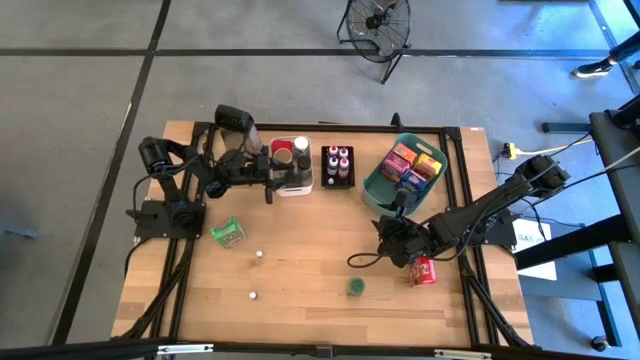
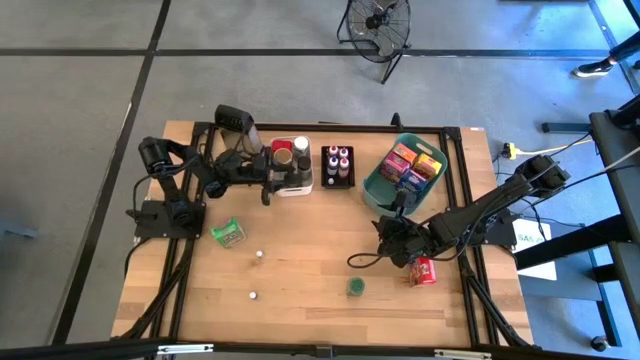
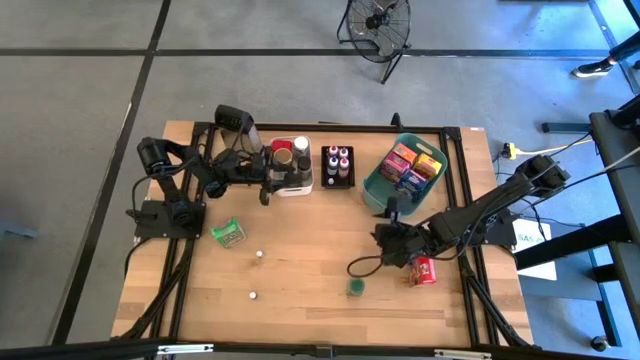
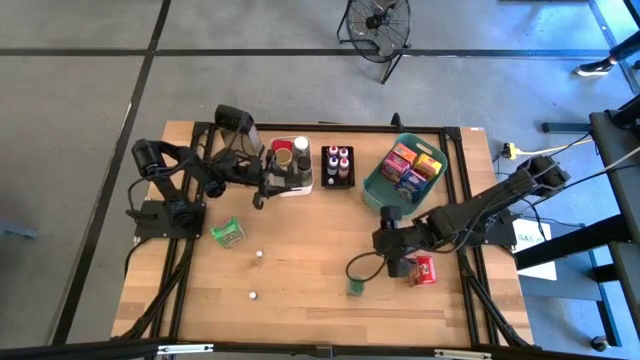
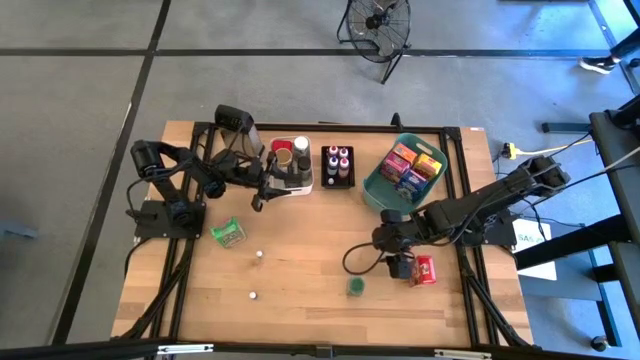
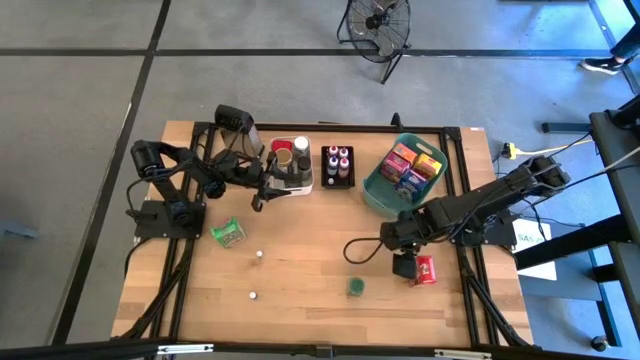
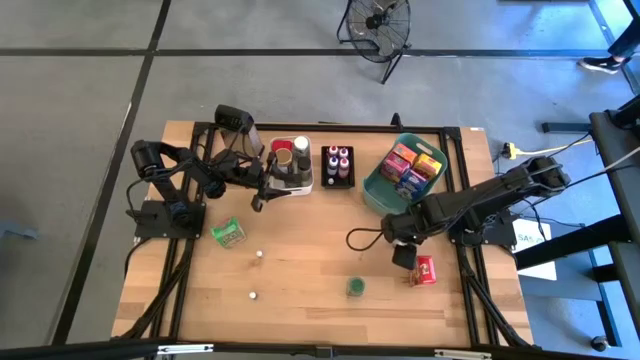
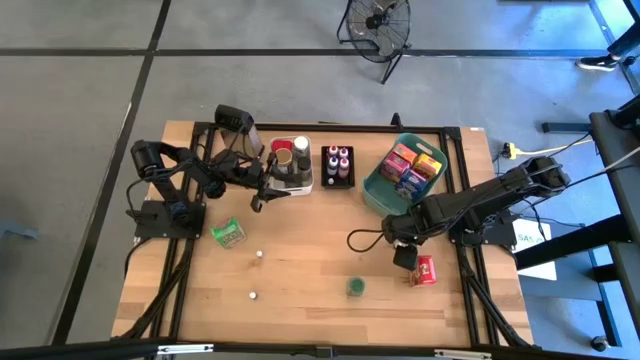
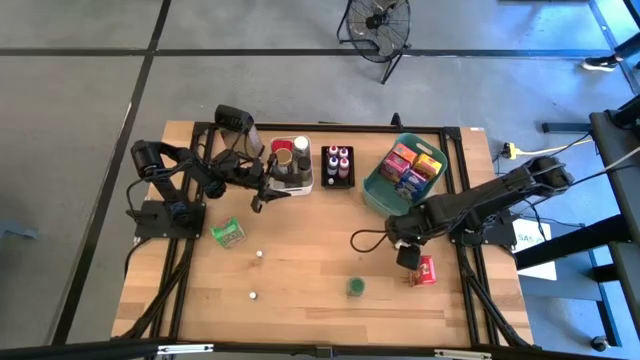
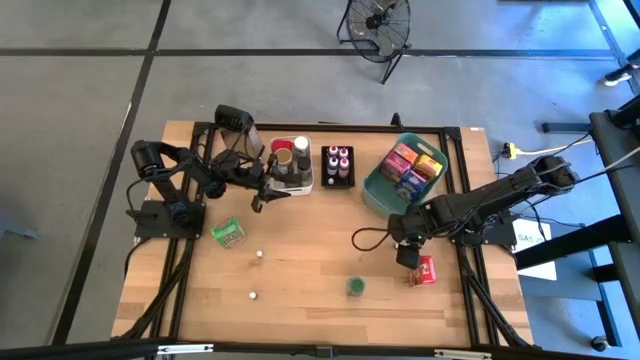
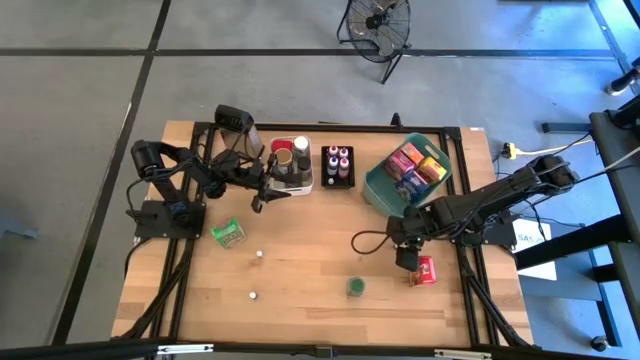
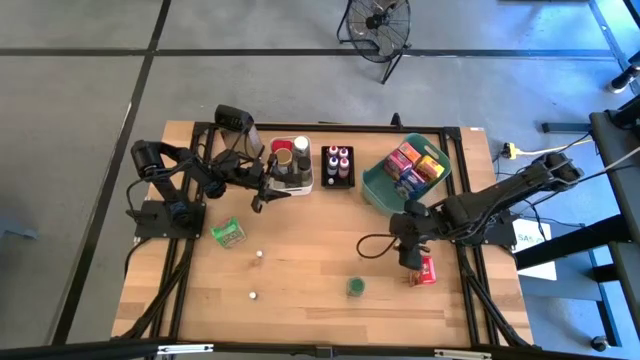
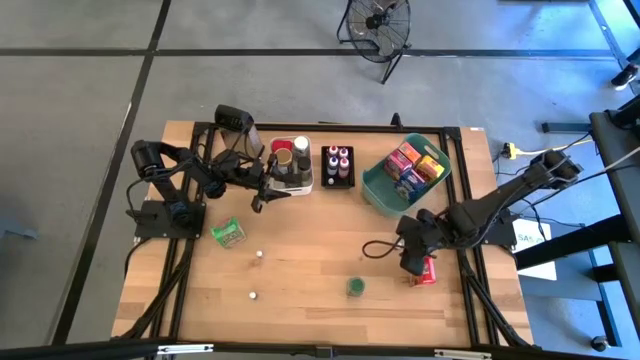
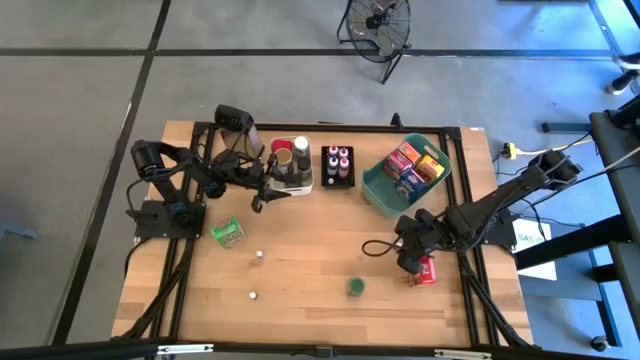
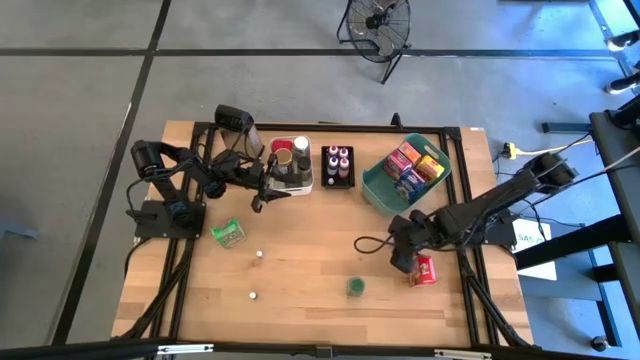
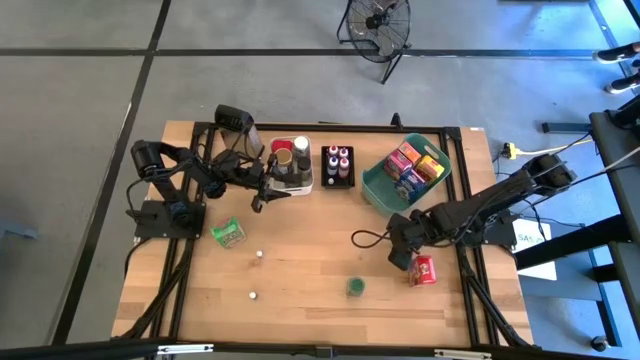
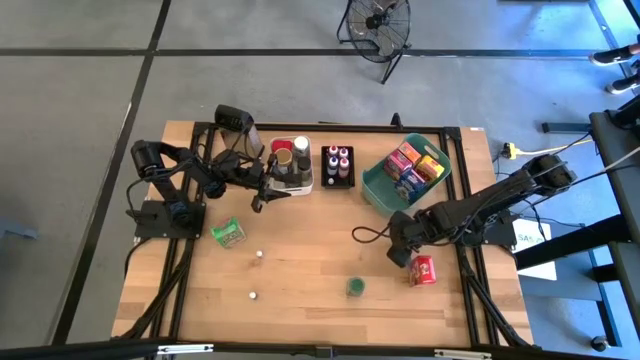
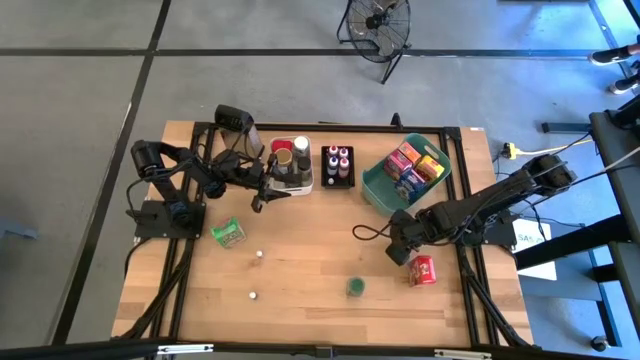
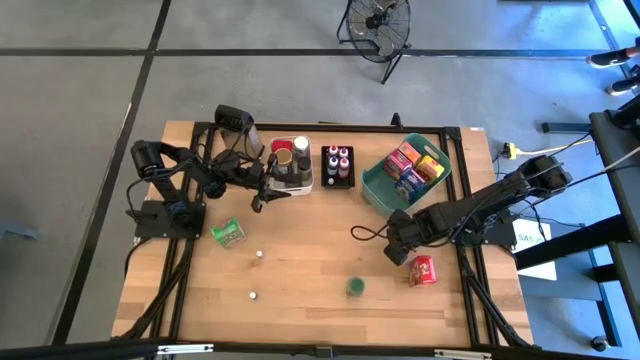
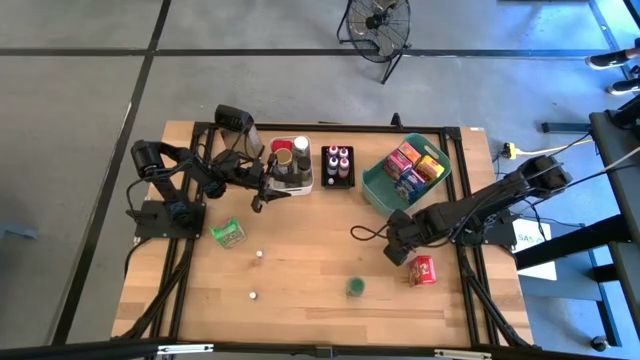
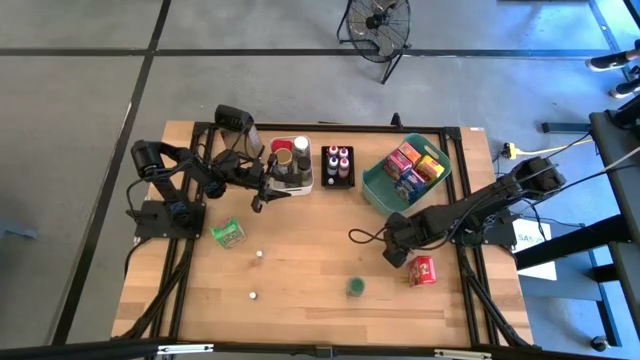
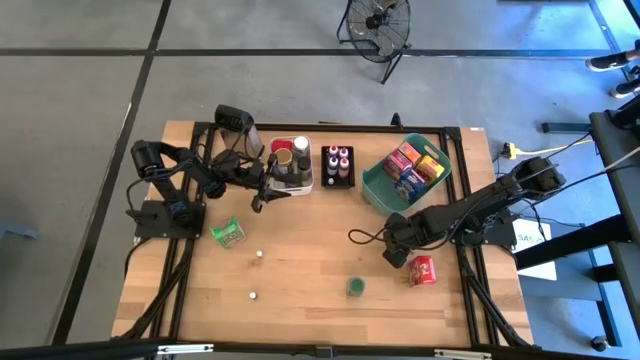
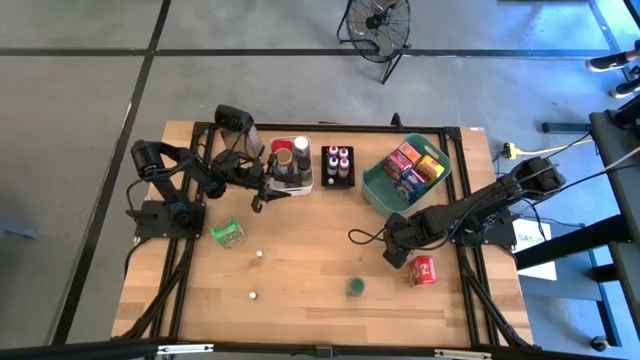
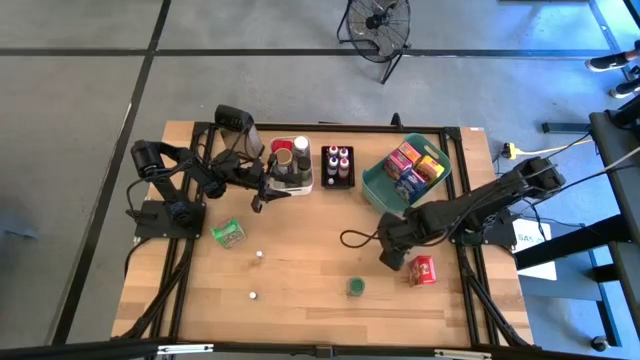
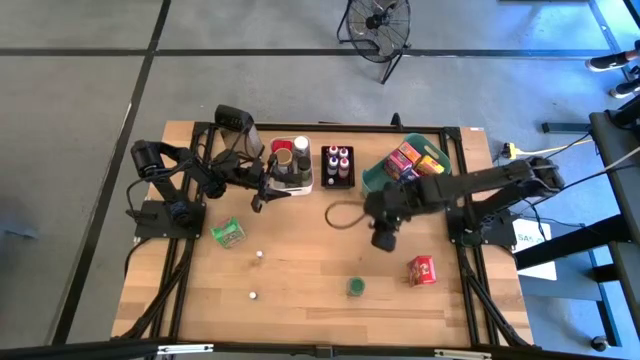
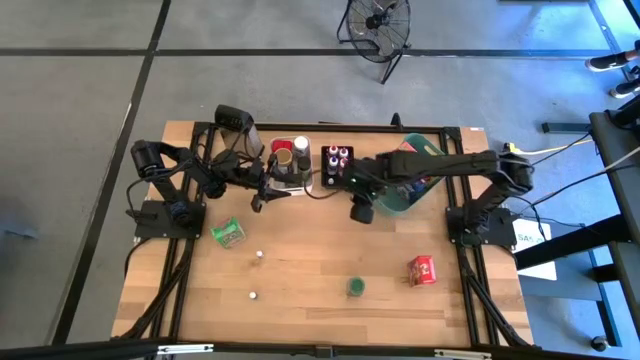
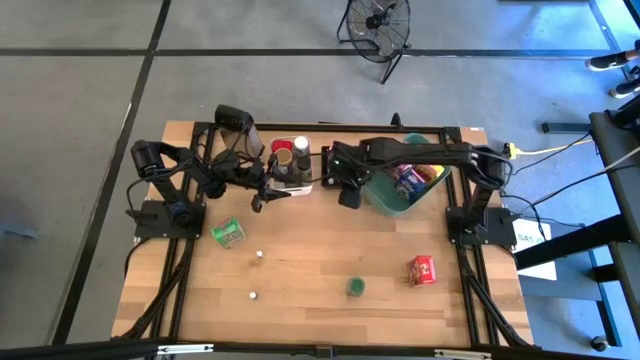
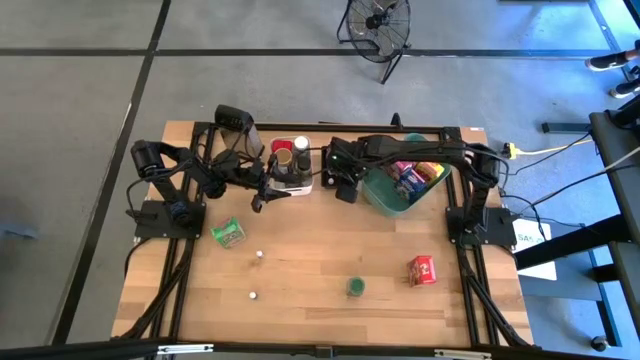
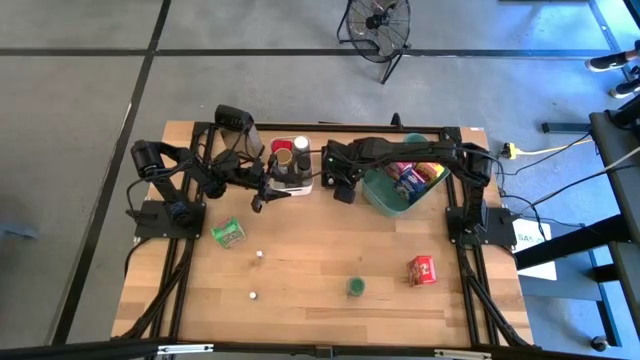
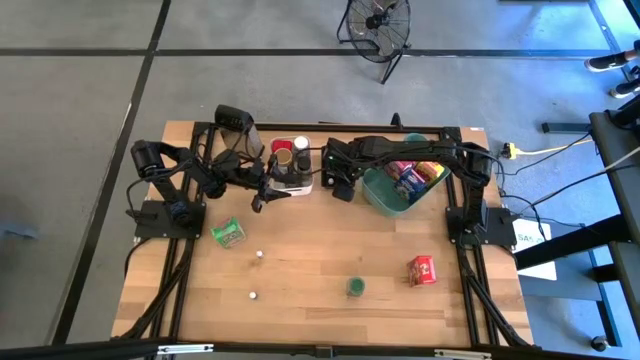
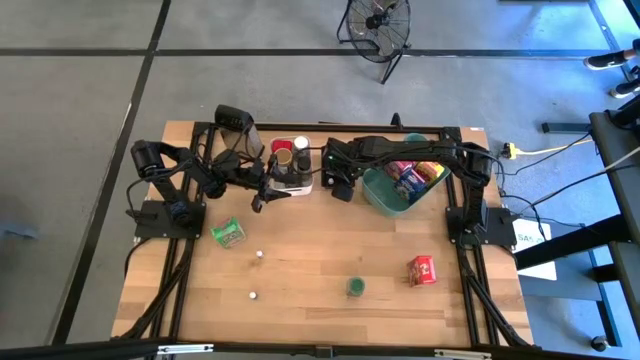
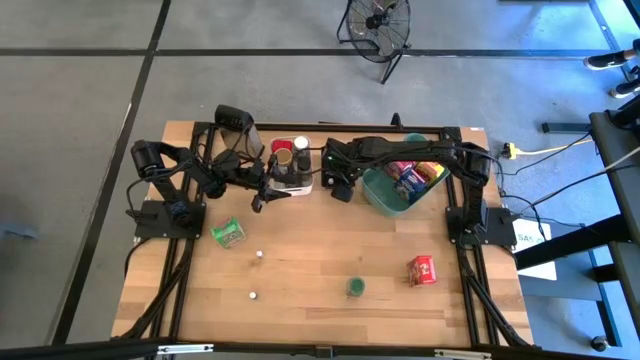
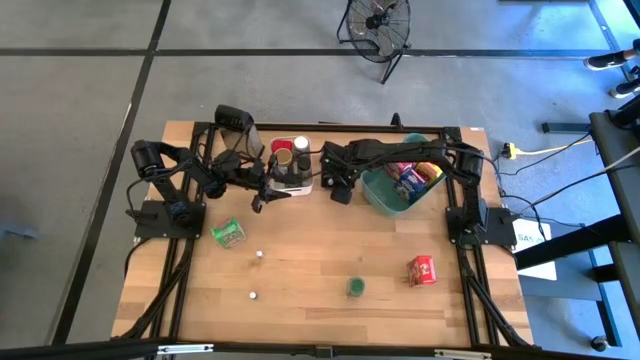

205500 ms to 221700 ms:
Task: Pick & Place Kitchen Items
Put the small purple food coloring bottle into the black bin

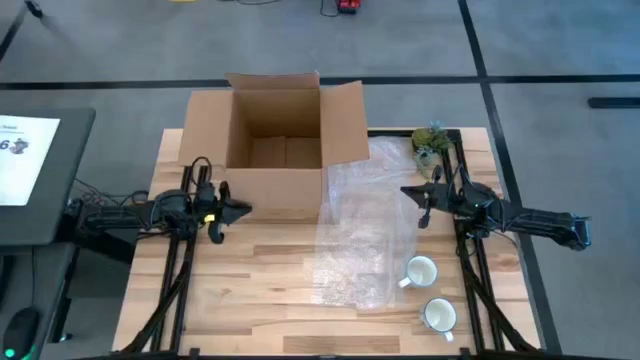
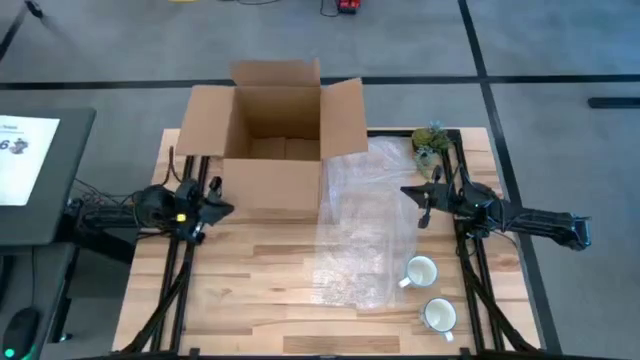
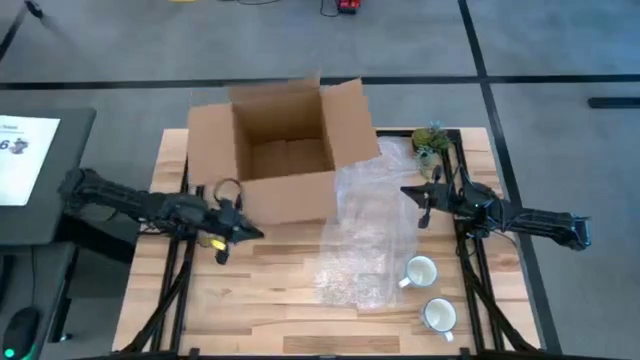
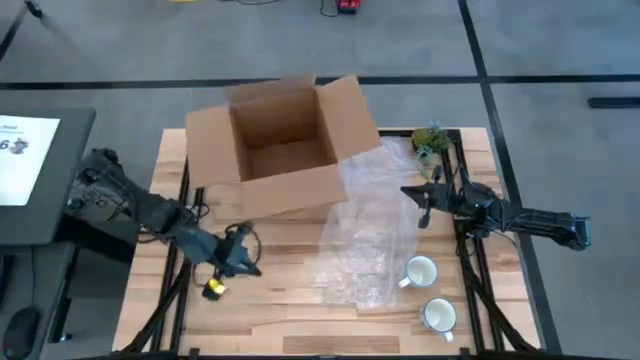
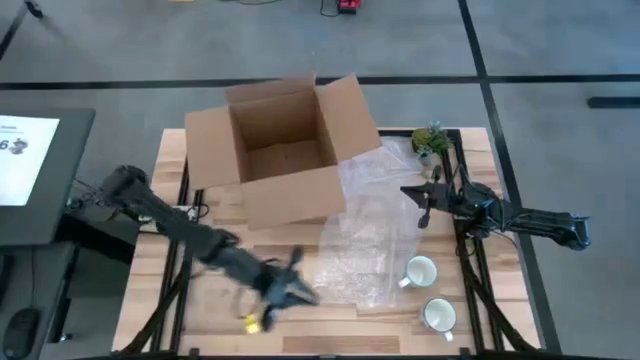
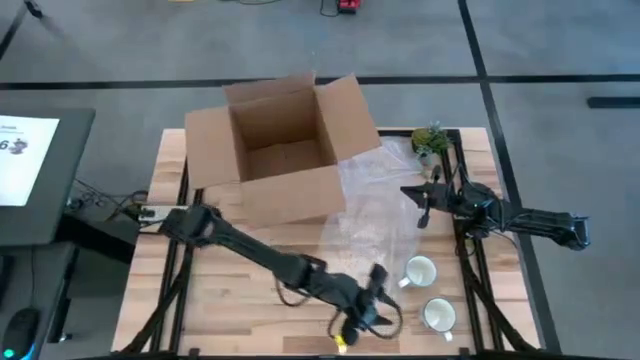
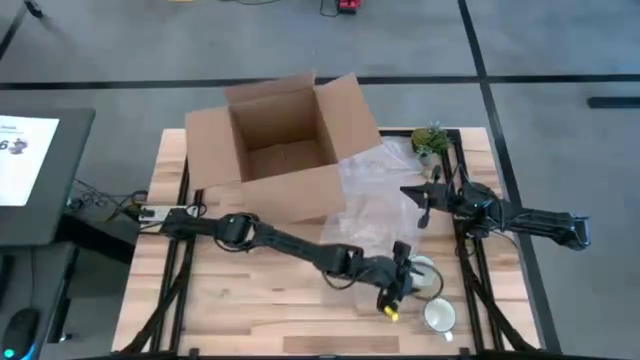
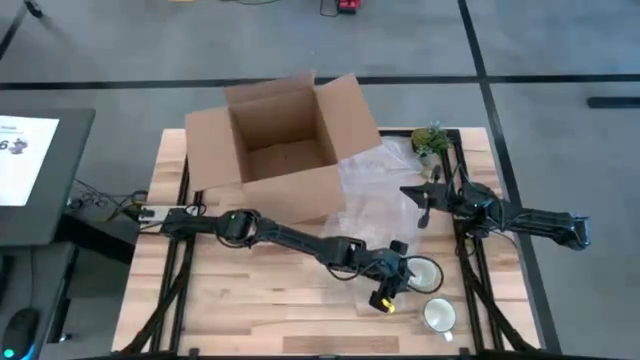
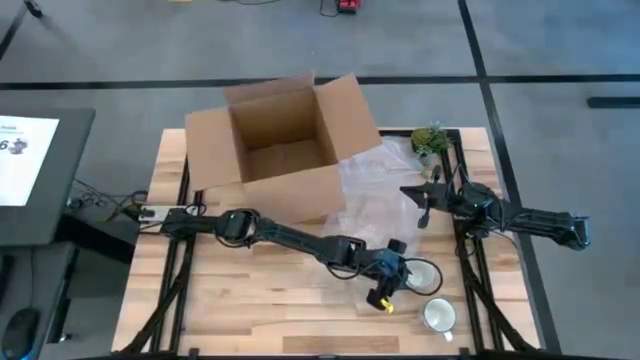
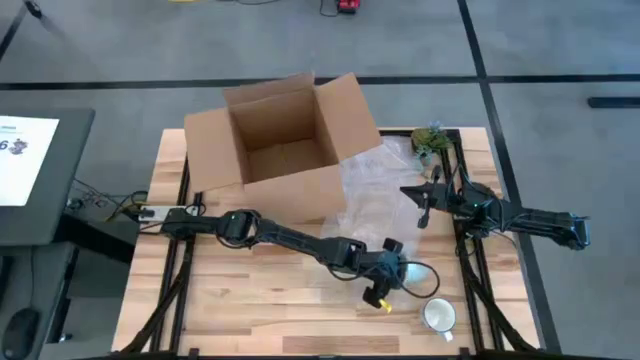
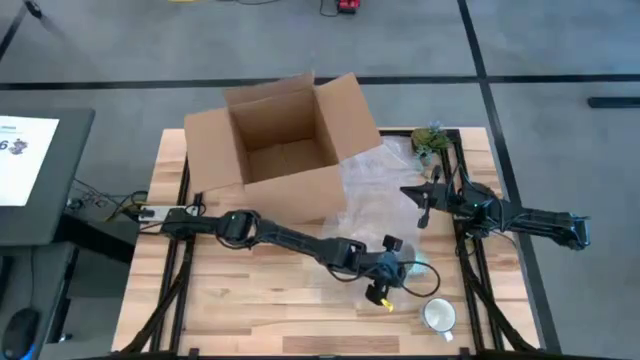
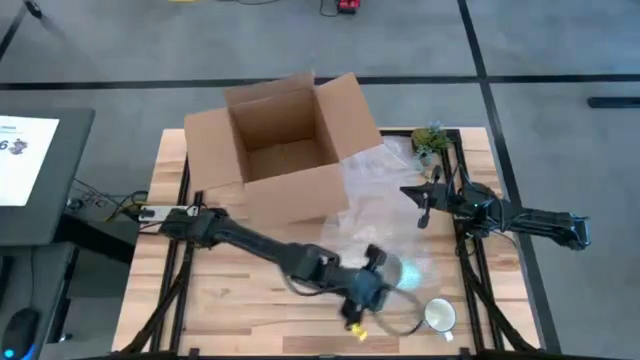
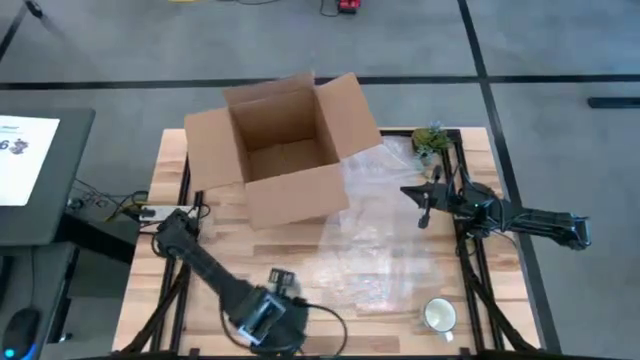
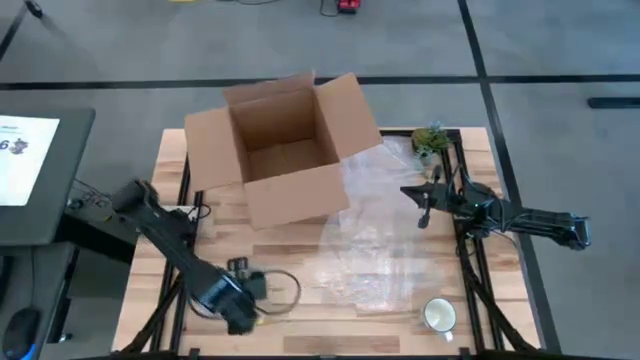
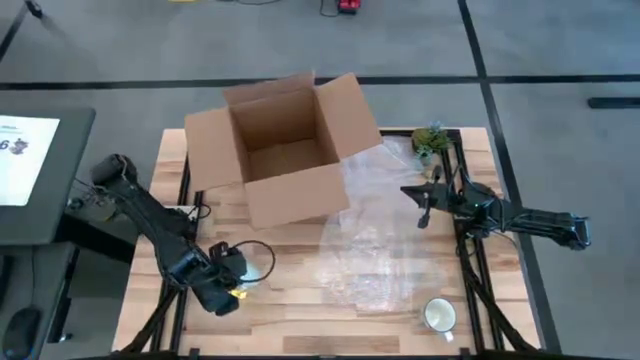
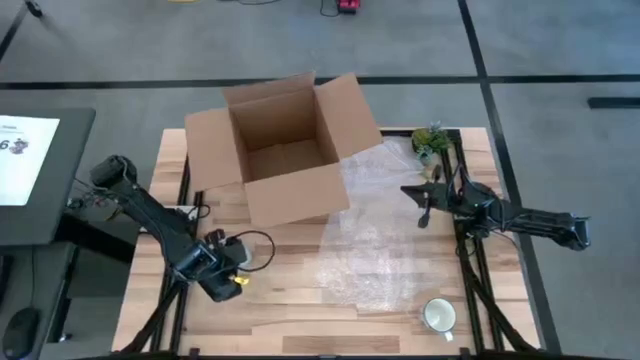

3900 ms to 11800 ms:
Task: wrap mug
Move the green patterned mug to the middle left of the table
